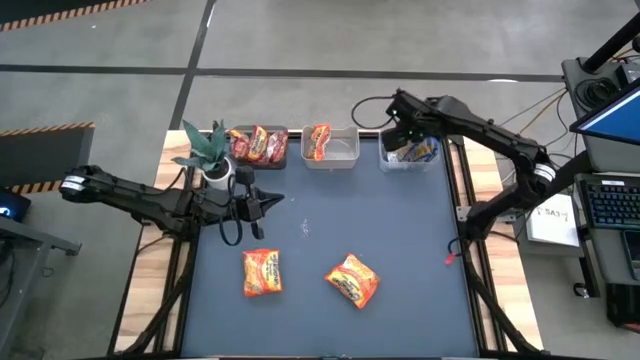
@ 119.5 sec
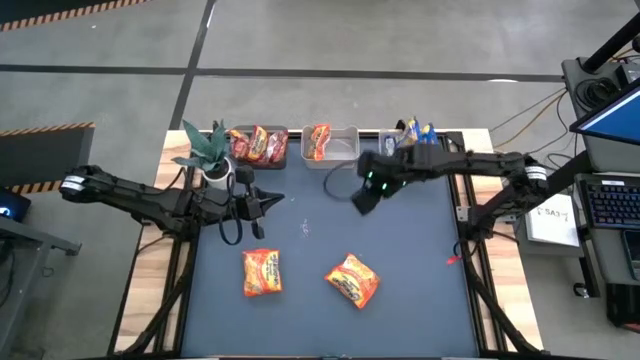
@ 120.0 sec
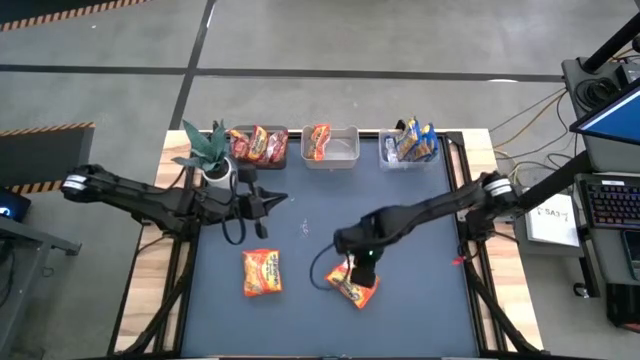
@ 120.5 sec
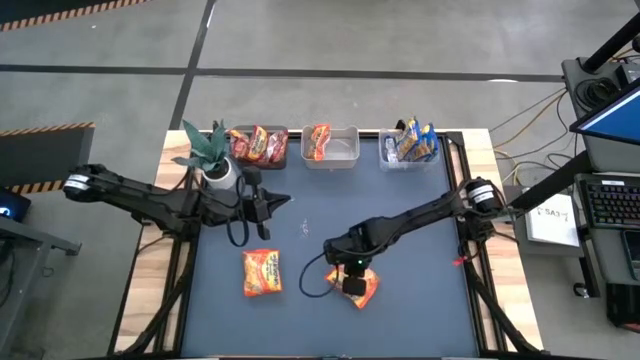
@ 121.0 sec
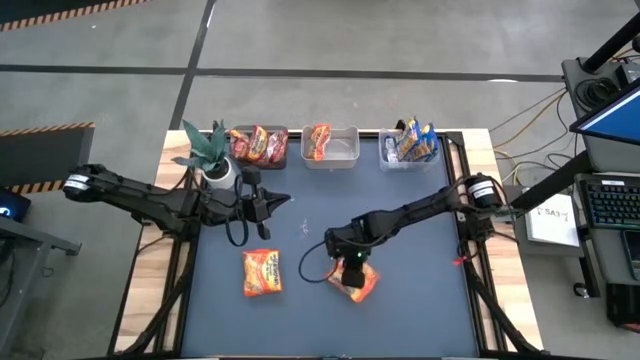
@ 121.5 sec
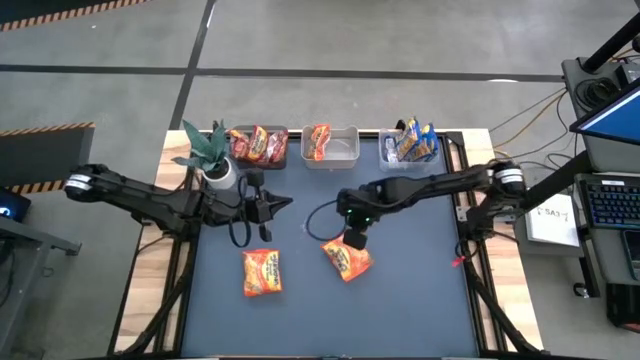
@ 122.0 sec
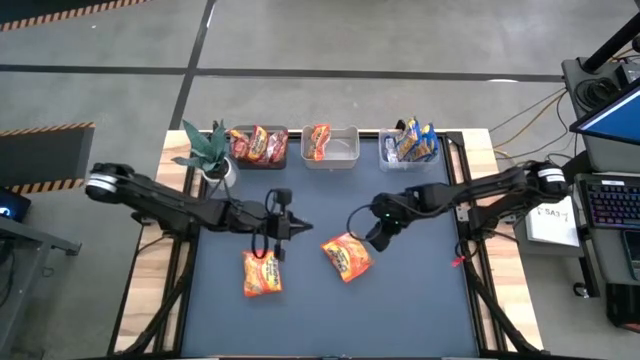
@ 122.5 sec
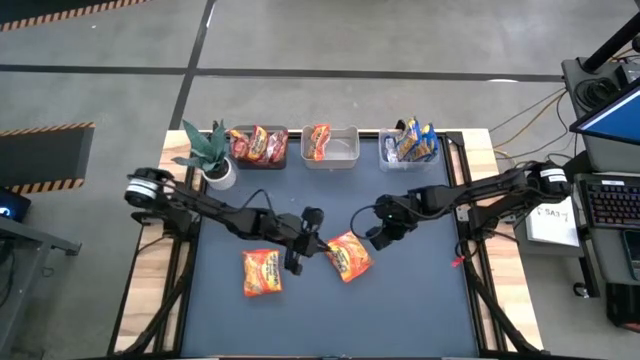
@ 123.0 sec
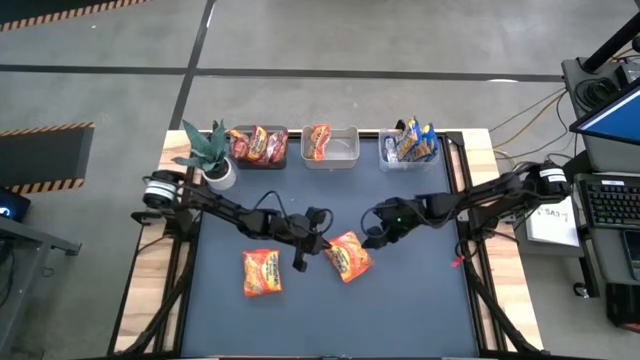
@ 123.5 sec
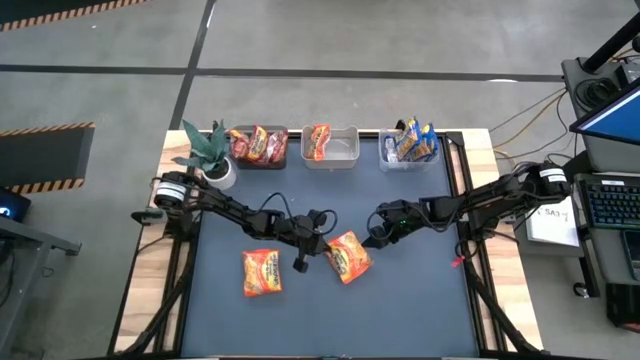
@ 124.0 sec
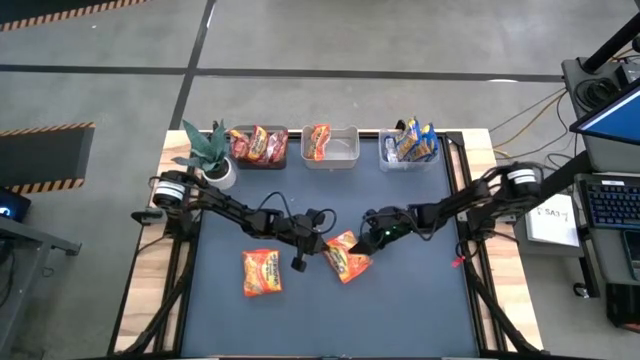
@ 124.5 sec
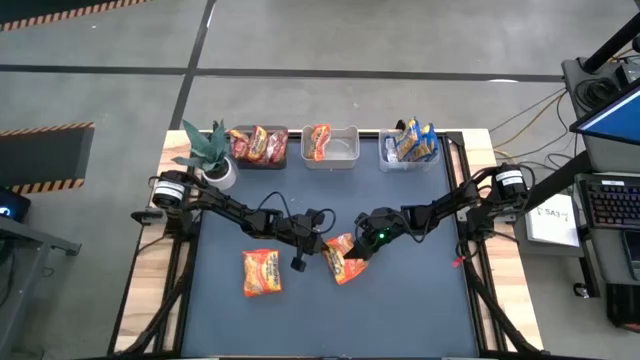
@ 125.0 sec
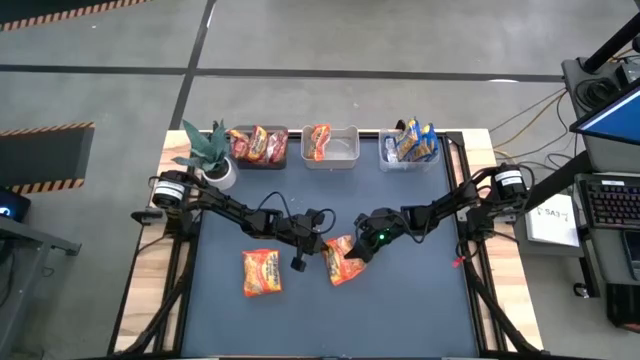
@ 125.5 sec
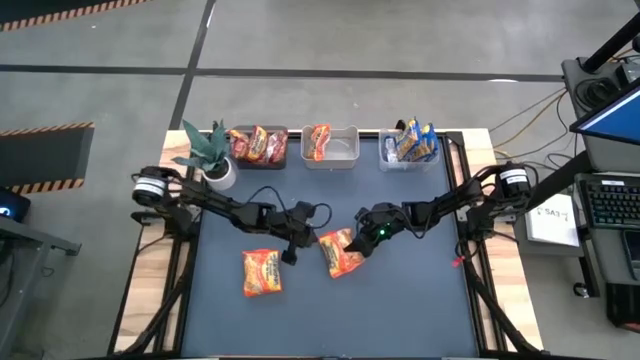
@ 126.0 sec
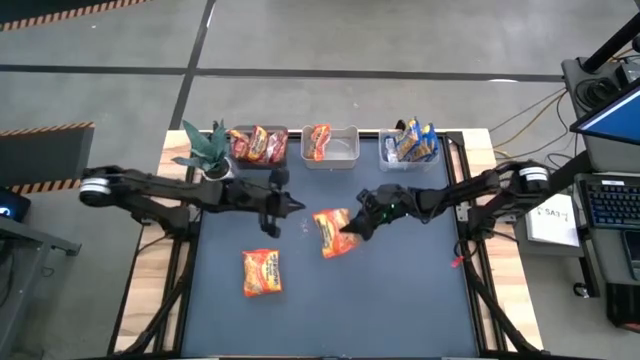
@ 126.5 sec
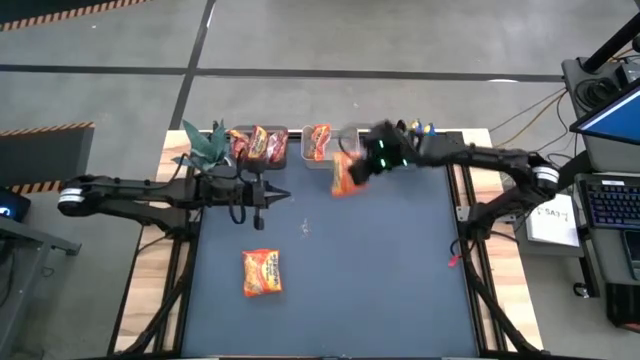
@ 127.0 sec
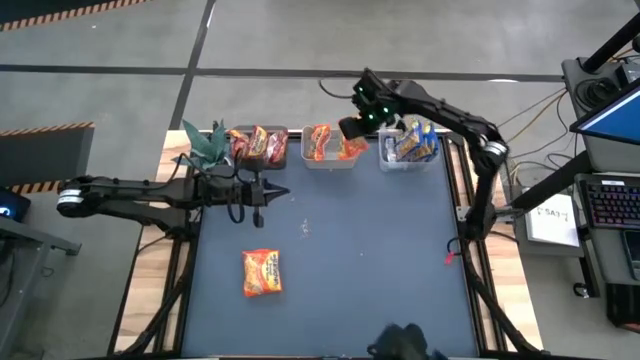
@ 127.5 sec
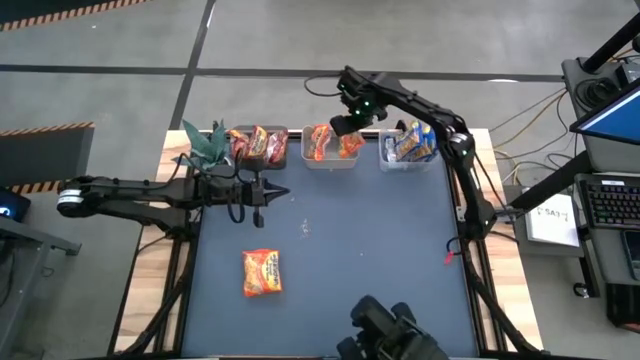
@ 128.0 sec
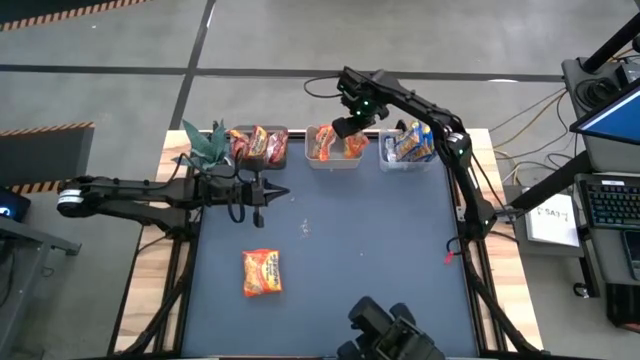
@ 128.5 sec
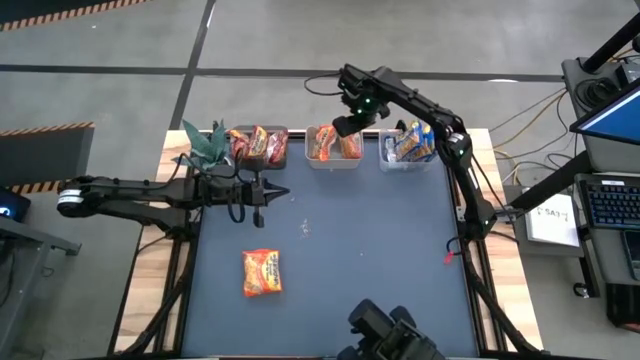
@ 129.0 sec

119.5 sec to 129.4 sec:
Task: Sort Maruchan noodles
Put the right orange noodle pack into the white bin

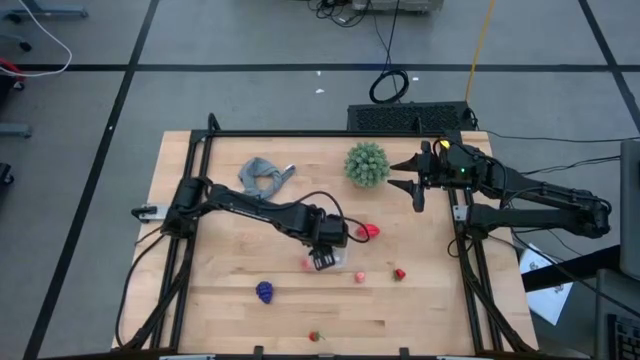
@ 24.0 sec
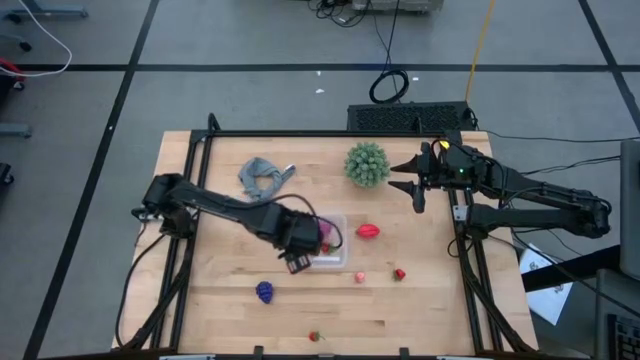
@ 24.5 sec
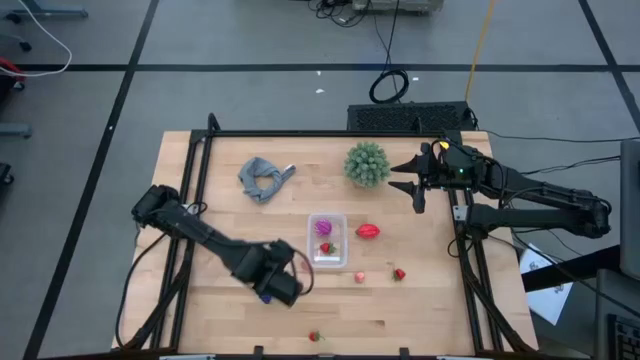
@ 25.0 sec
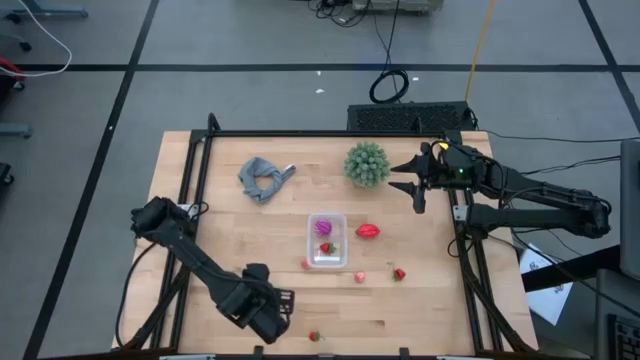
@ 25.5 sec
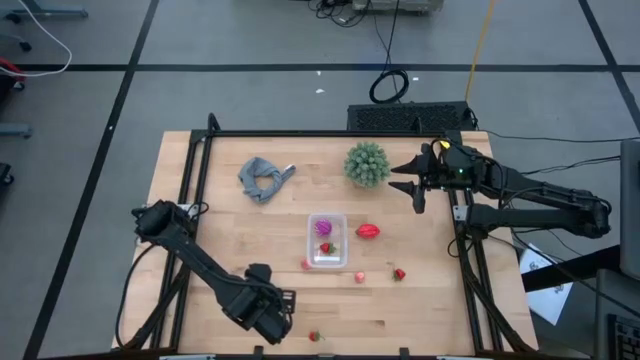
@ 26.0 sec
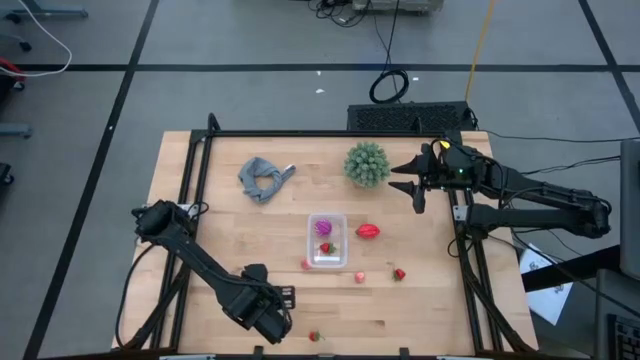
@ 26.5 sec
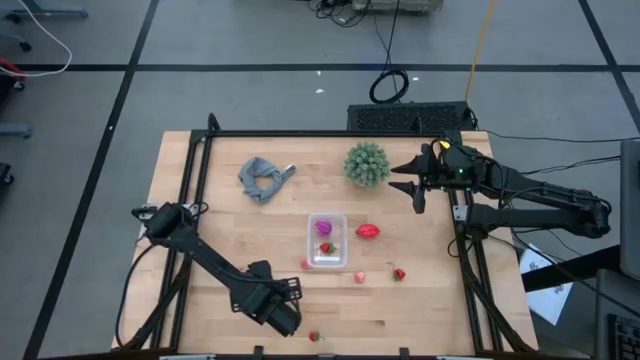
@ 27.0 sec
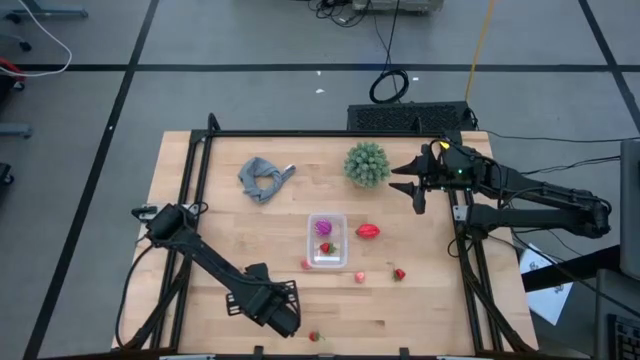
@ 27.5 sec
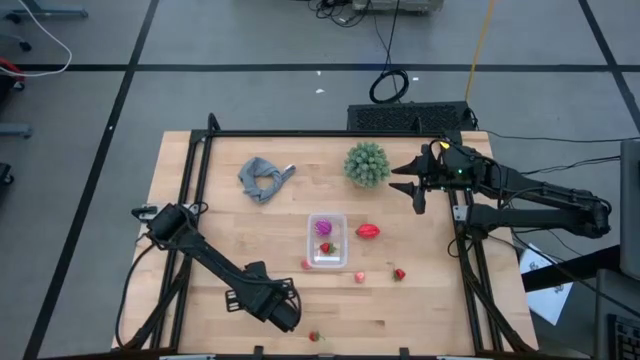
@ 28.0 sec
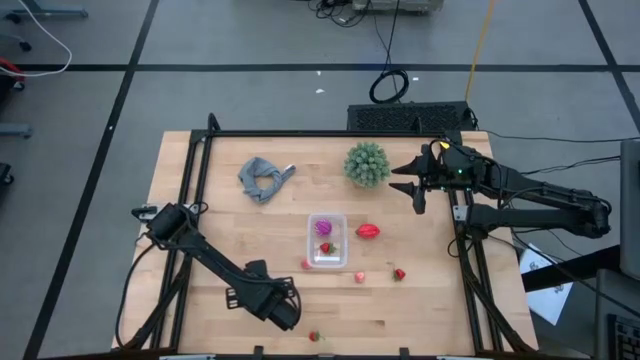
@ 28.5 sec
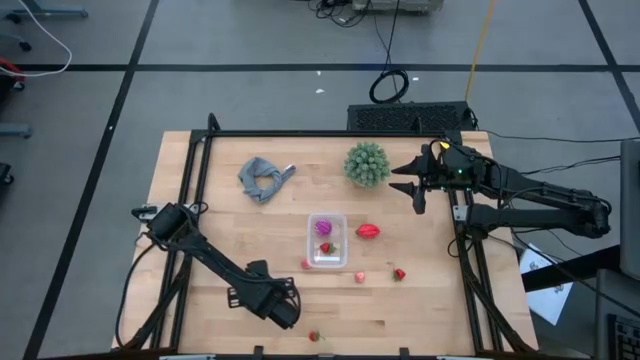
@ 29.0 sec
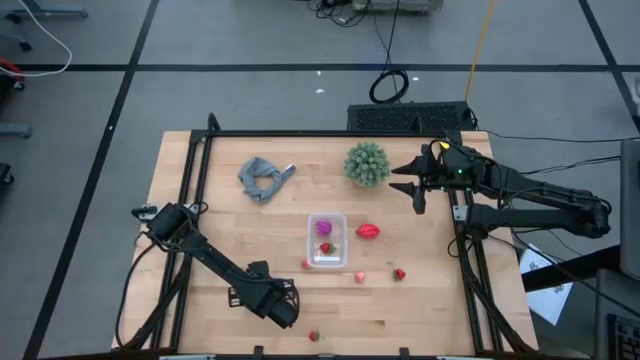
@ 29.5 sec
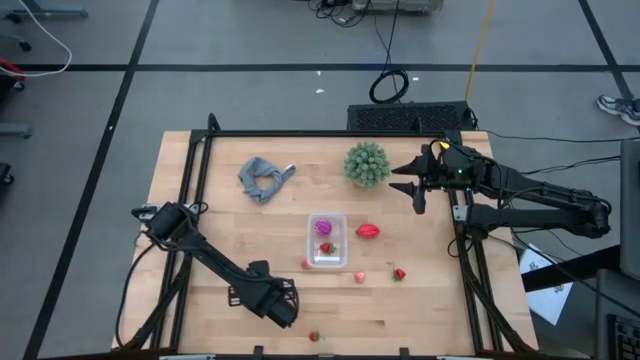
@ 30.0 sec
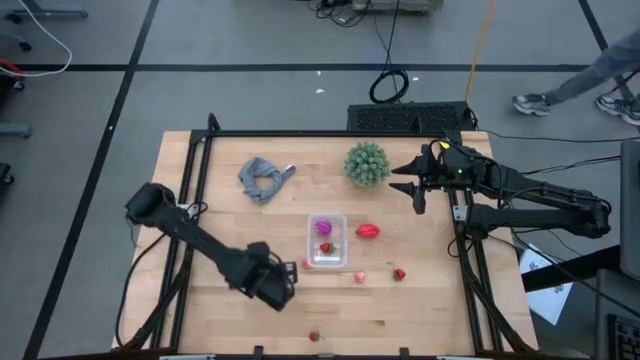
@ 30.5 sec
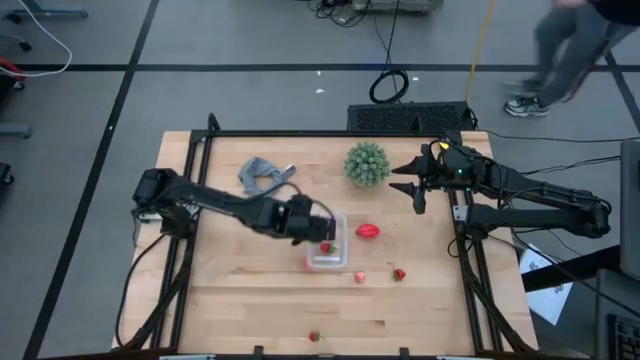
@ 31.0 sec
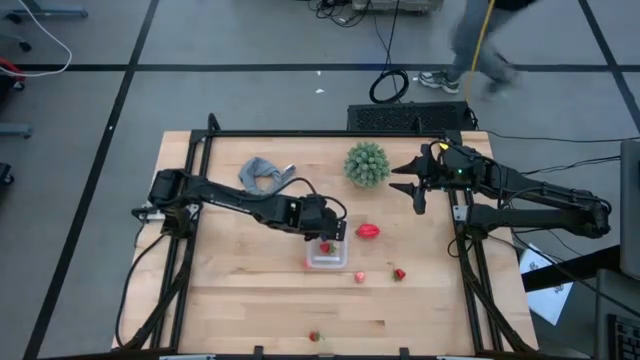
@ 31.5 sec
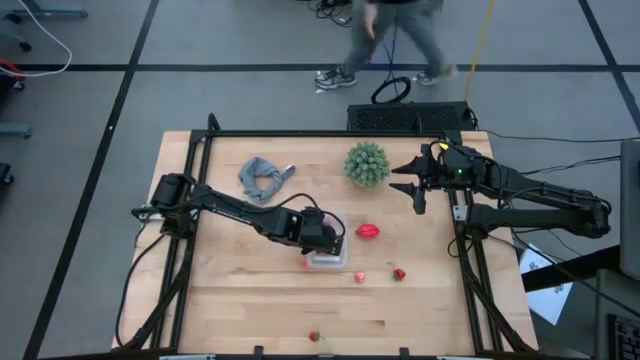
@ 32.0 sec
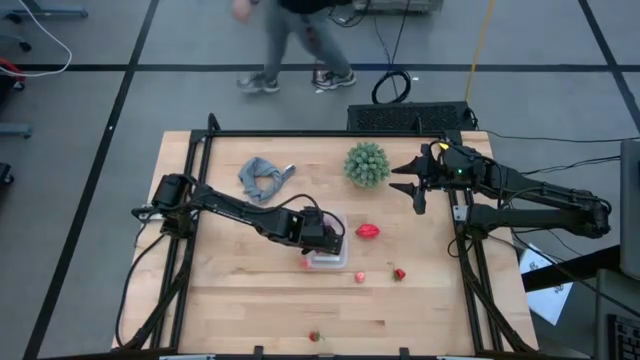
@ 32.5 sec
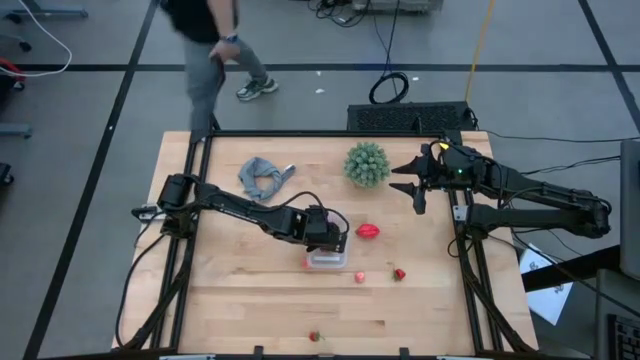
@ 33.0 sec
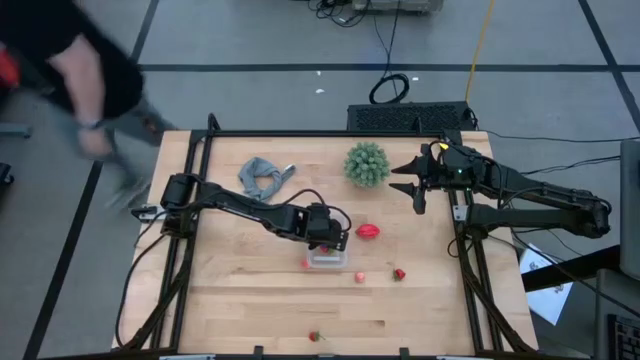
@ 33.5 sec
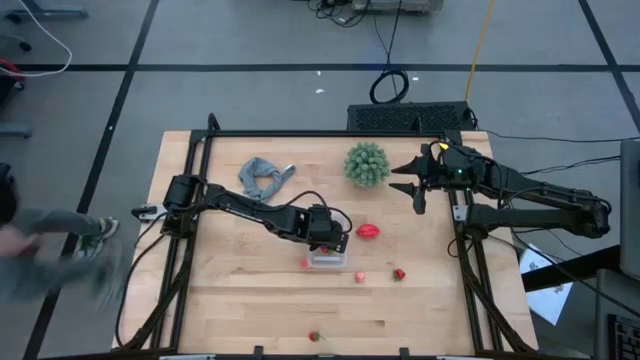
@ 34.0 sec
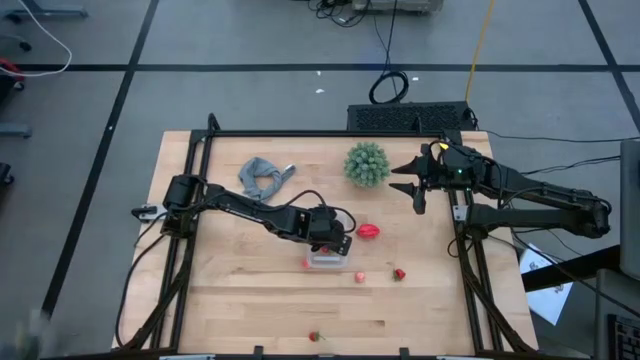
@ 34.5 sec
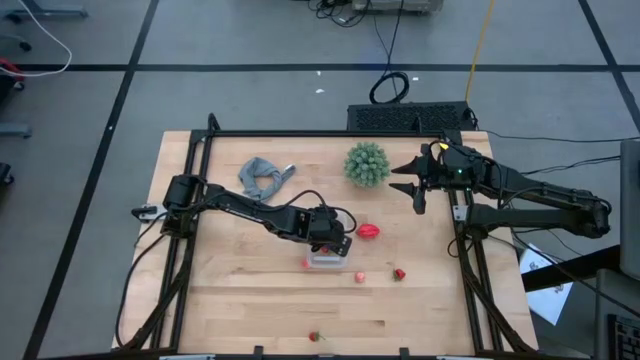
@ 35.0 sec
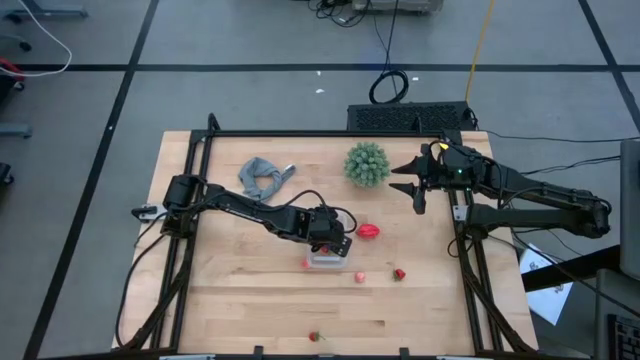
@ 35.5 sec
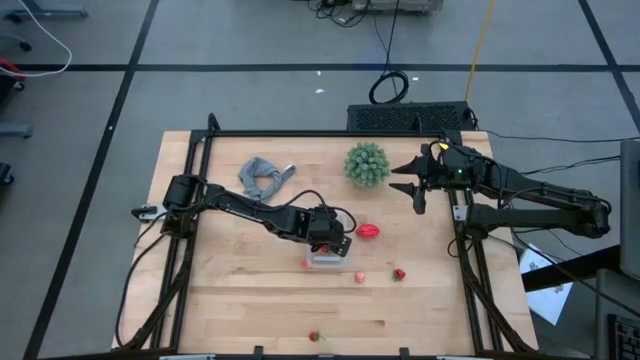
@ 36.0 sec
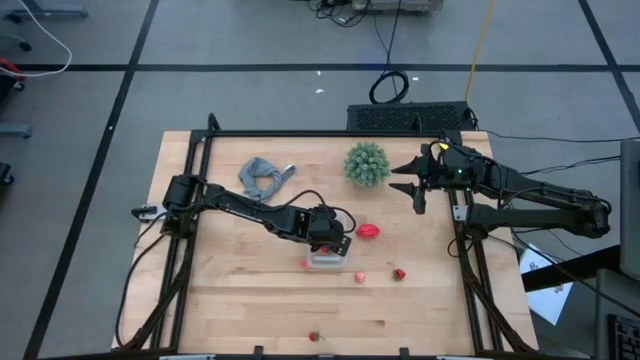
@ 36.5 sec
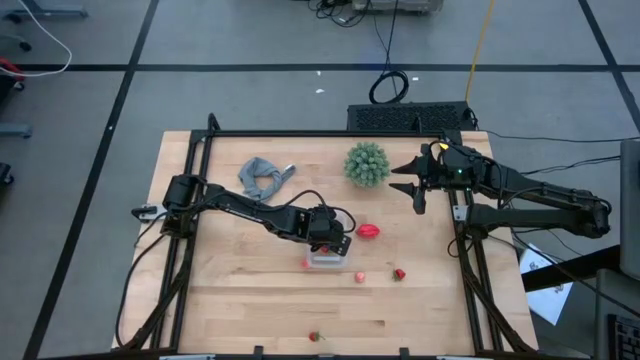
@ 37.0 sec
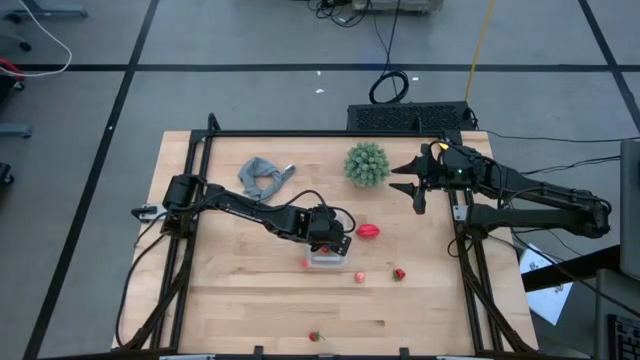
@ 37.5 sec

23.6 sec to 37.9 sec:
Task: Pick and placing Produce into tupperware
Put the grape into the transparent bin
